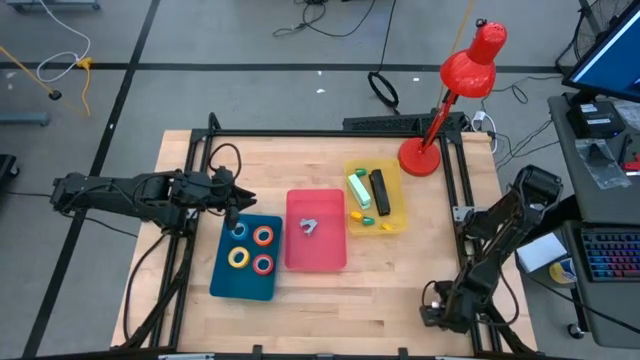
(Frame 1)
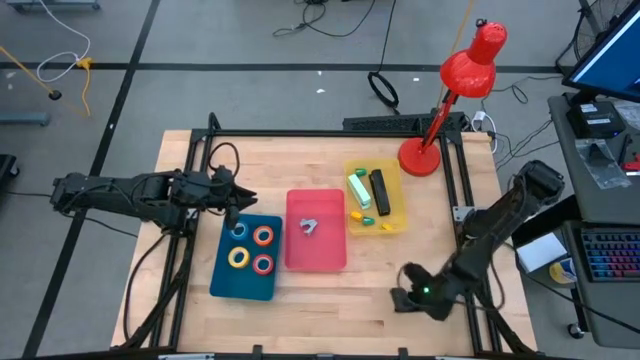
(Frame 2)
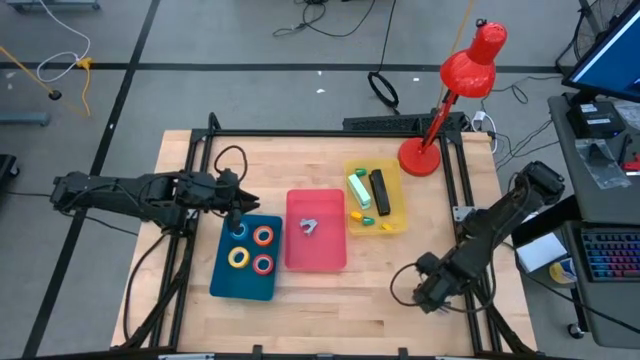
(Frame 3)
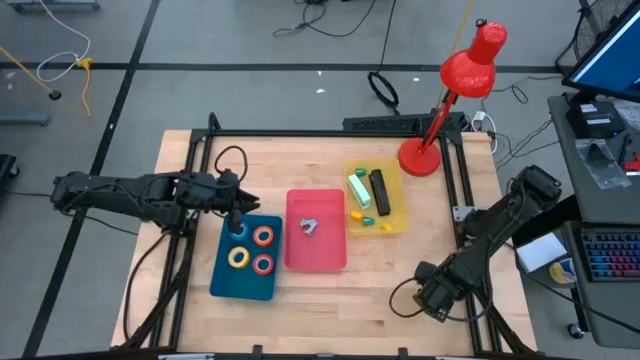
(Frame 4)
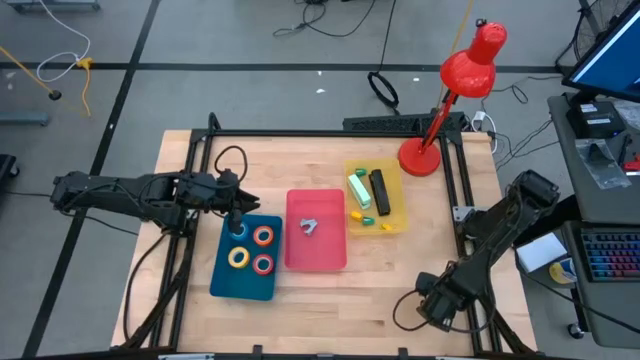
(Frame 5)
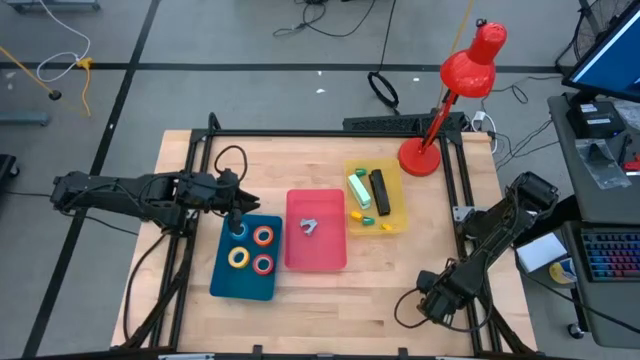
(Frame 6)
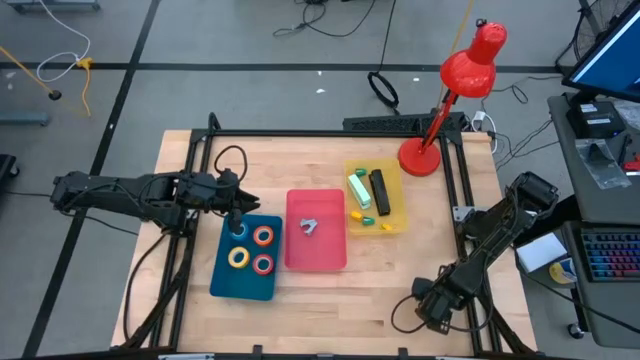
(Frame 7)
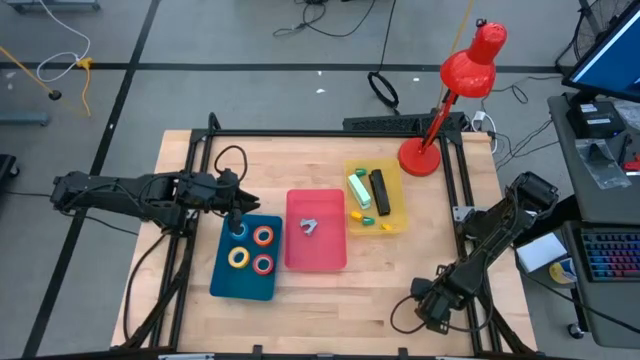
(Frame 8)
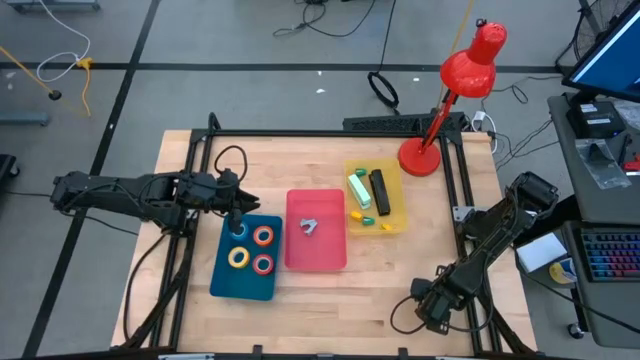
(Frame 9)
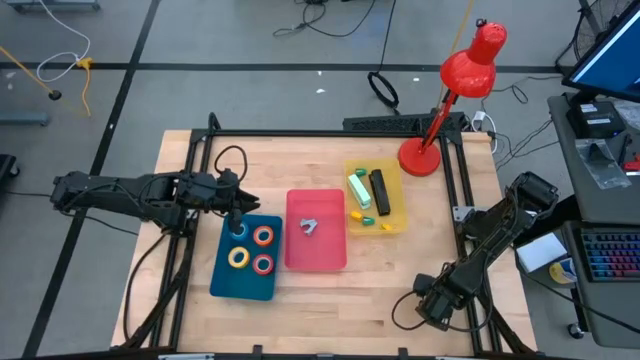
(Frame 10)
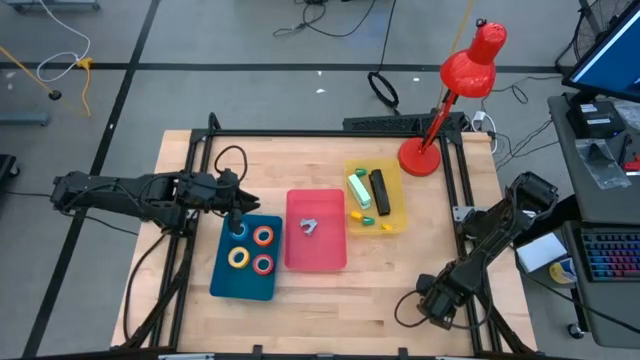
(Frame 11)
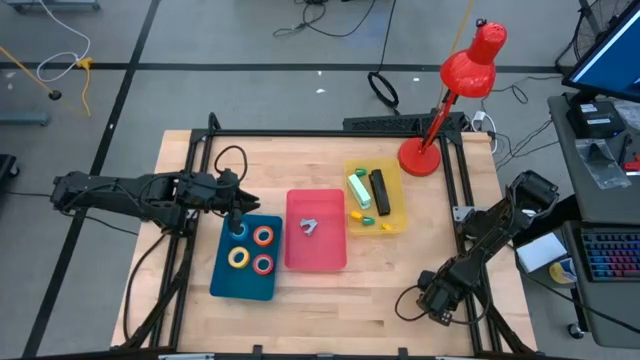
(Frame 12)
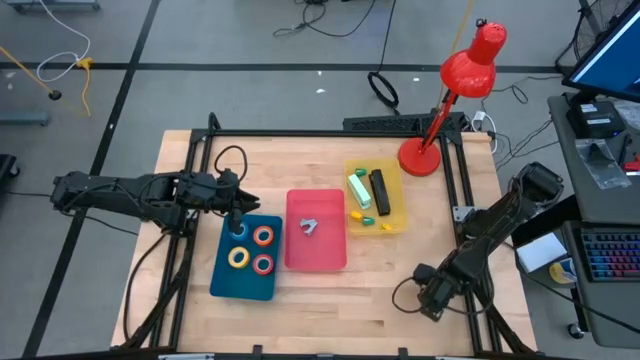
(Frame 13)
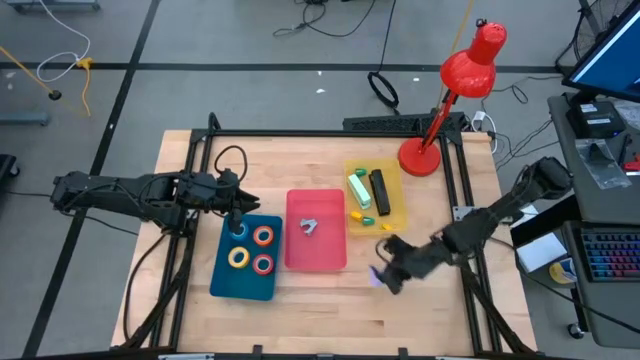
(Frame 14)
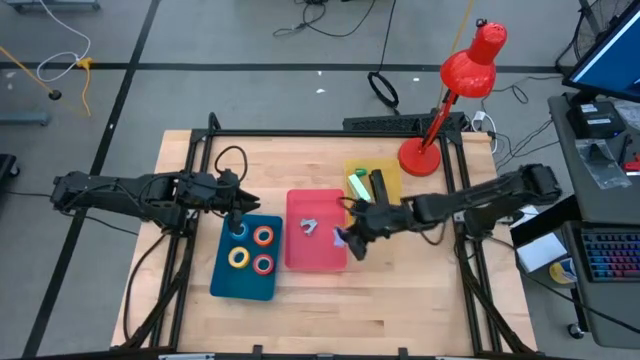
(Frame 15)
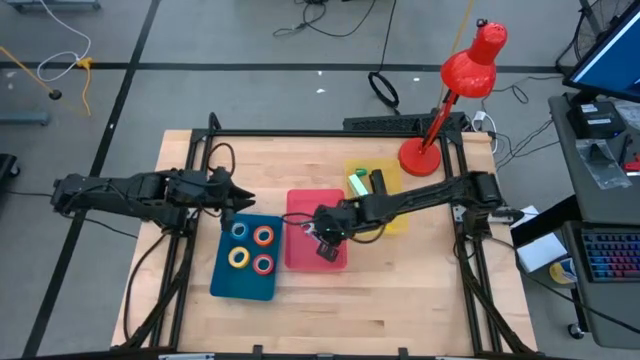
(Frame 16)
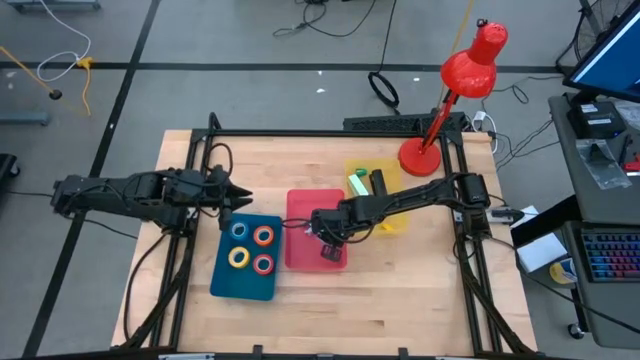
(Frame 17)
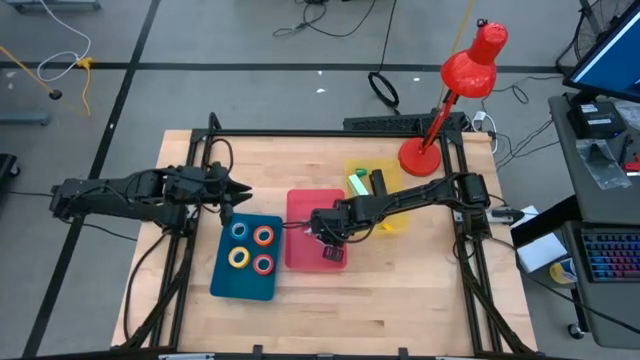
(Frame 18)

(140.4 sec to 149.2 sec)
Task: Pick and place Stapler, Stapler remover, tape
Put the purple staple remover into the yellow bin

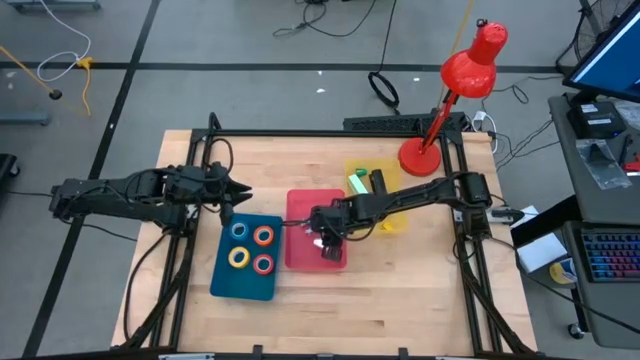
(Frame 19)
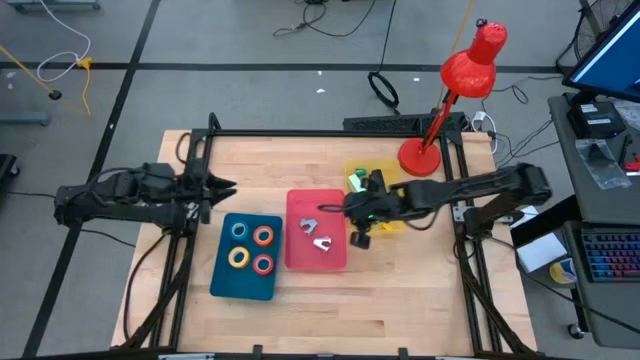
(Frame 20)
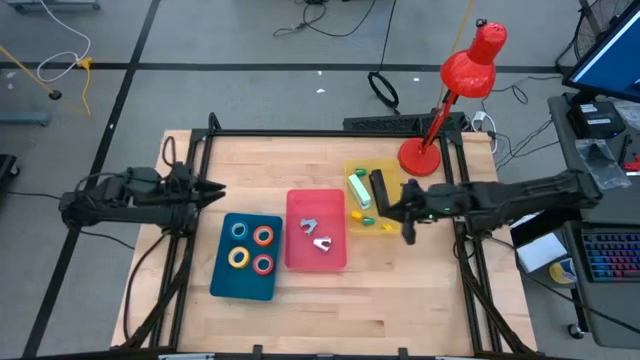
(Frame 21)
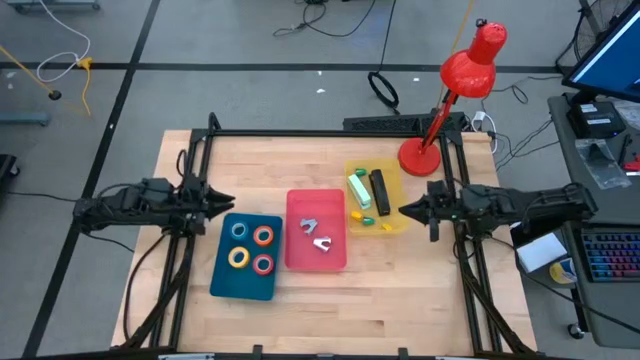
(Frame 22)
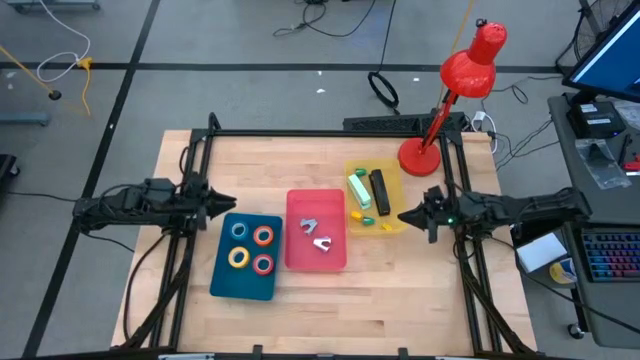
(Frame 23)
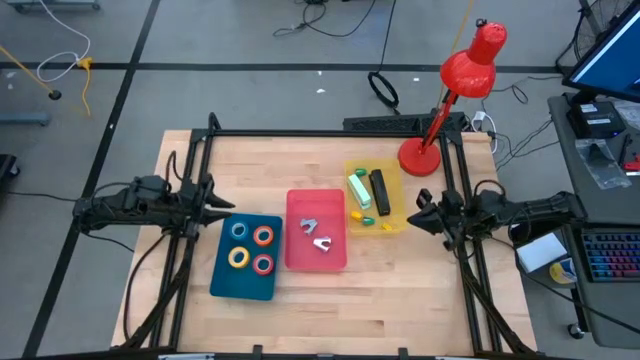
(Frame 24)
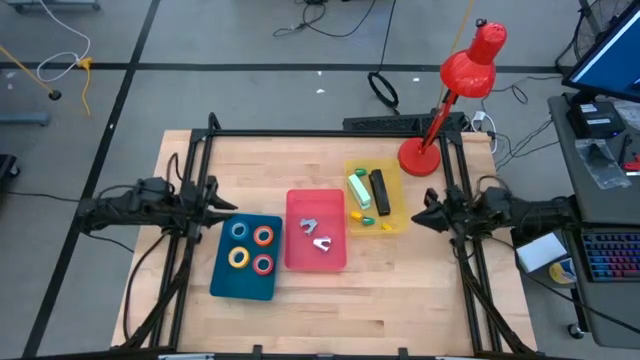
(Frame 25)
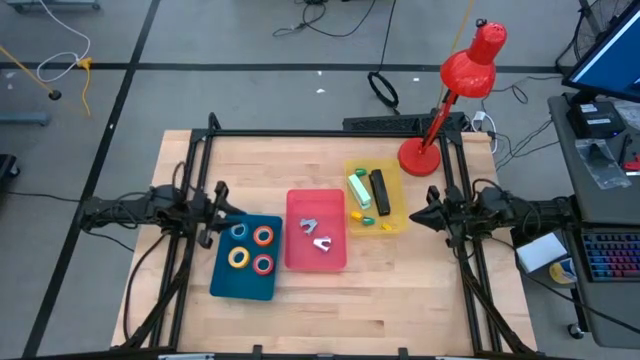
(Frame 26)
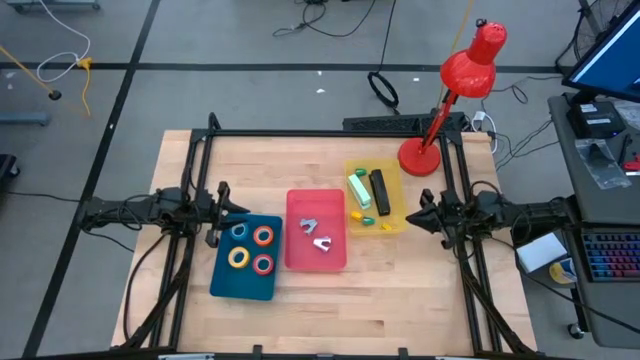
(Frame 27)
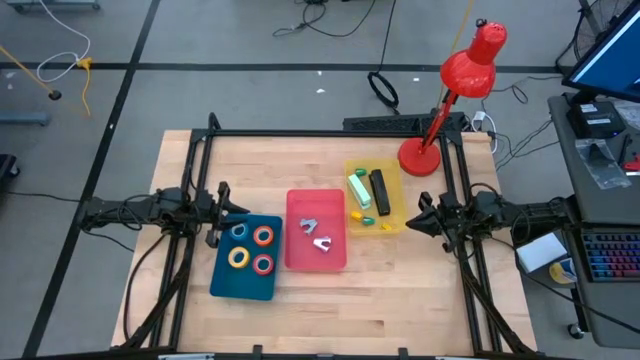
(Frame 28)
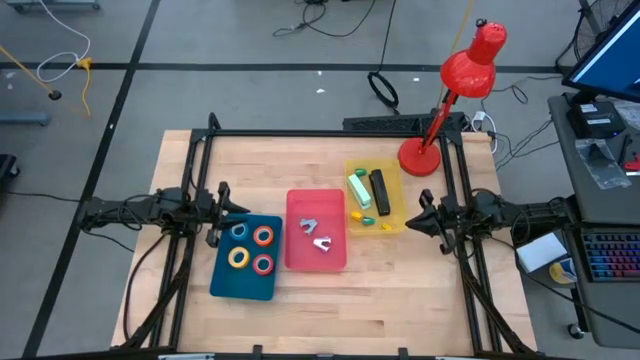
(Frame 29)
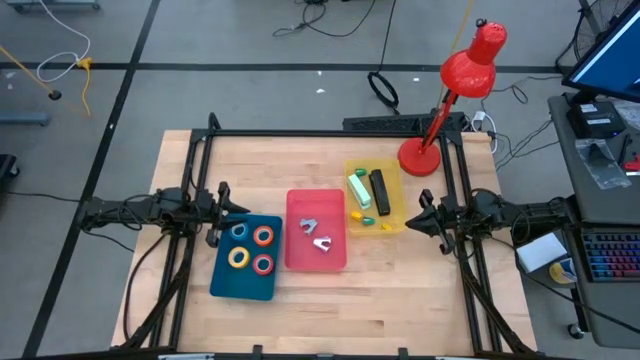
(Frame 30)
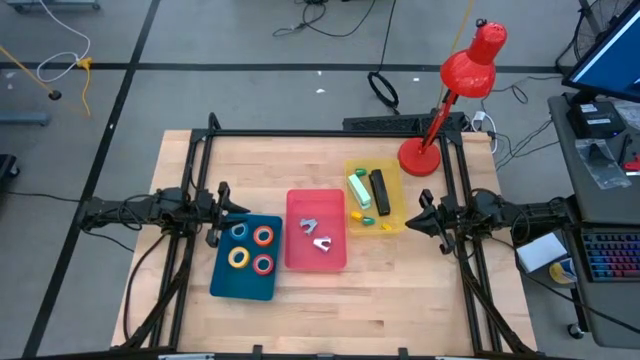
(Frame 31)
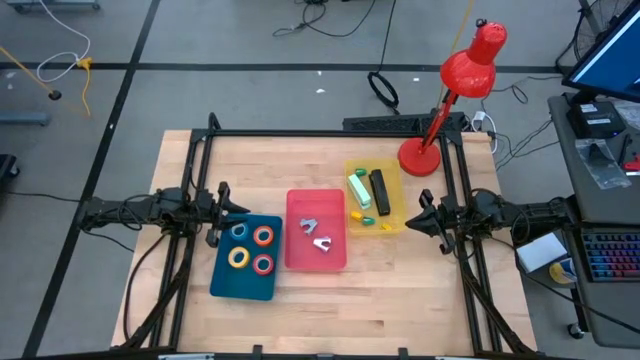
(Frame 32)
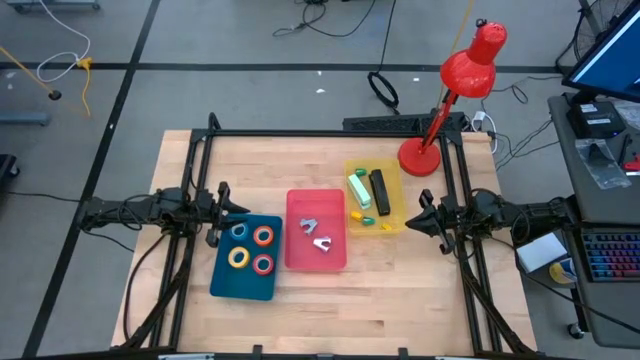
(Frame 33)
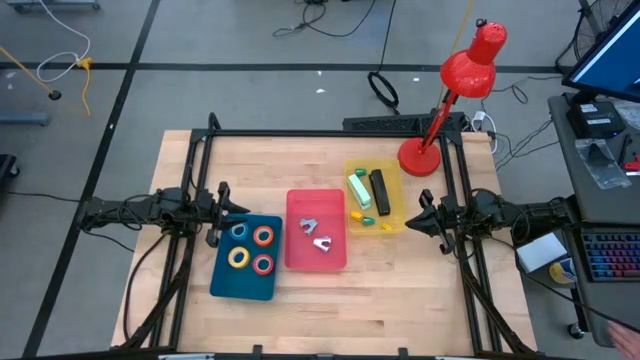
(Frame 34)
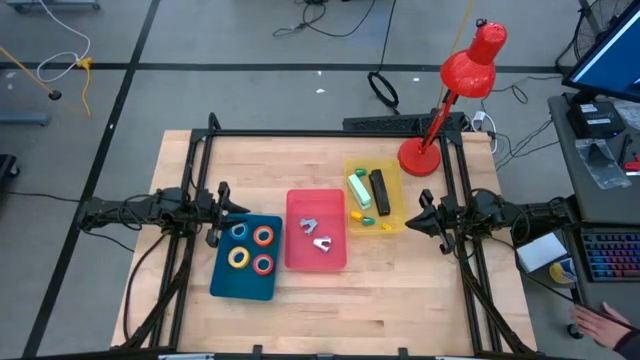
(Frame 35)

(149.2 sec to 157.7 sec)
Return to Home Position

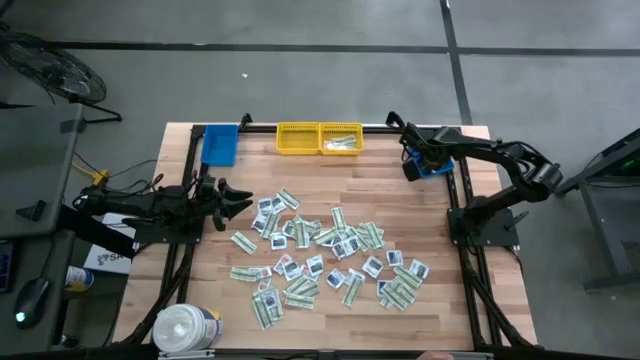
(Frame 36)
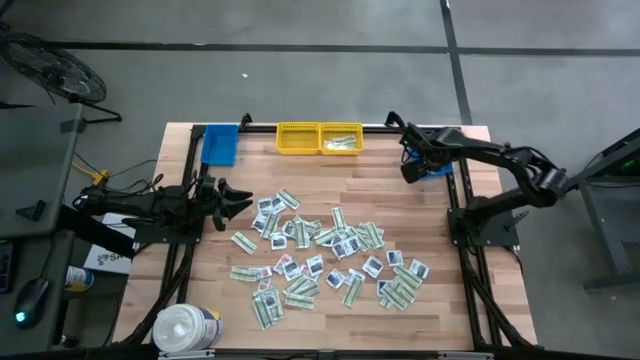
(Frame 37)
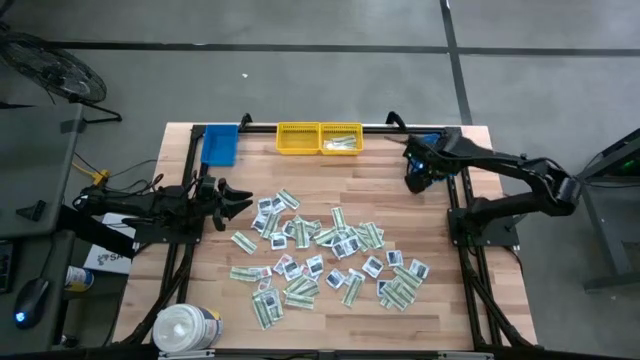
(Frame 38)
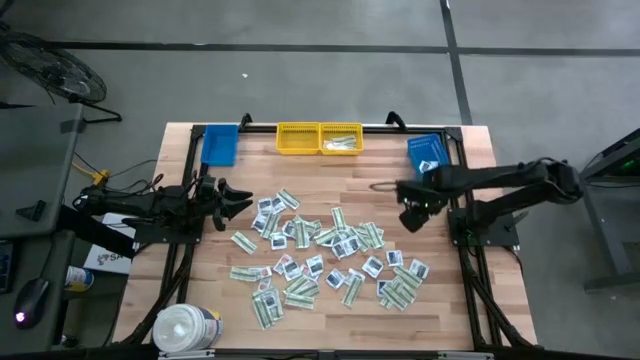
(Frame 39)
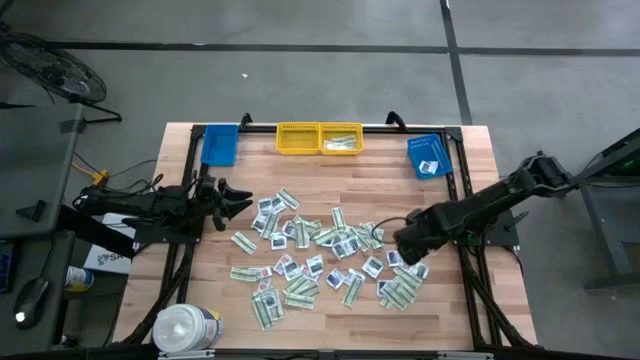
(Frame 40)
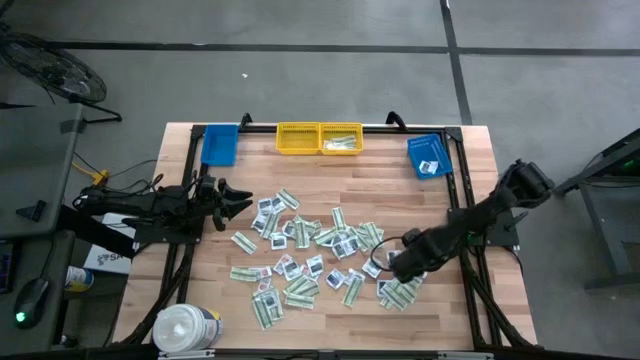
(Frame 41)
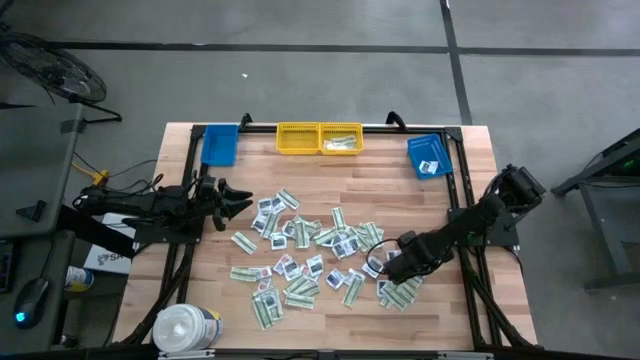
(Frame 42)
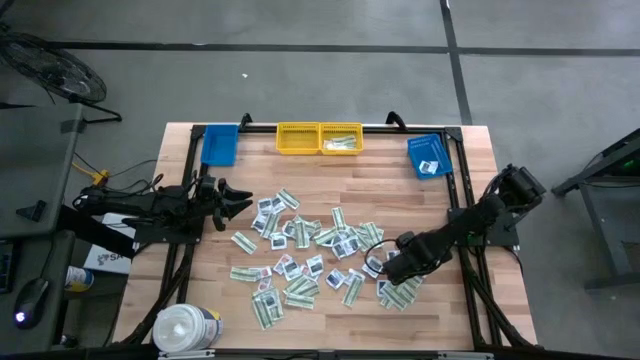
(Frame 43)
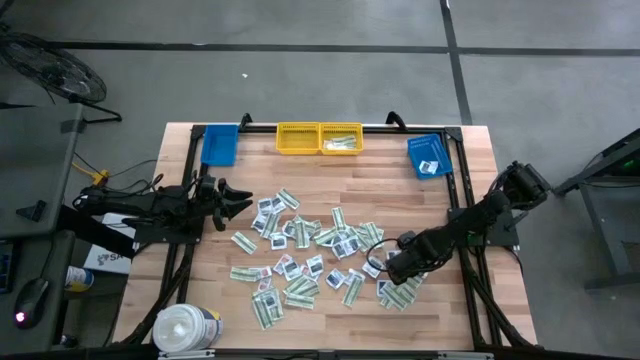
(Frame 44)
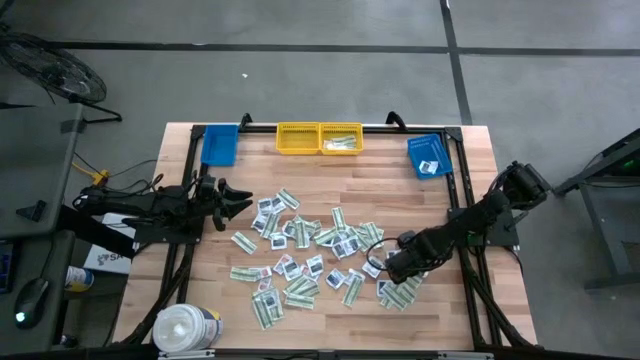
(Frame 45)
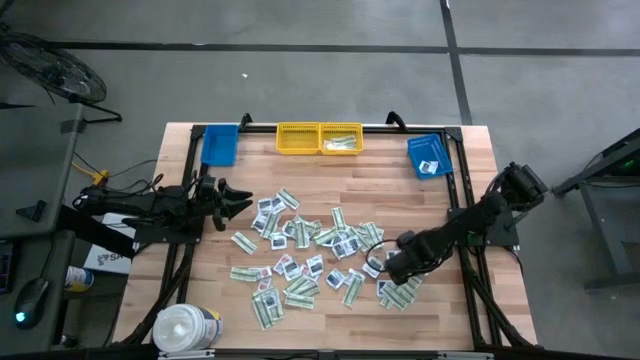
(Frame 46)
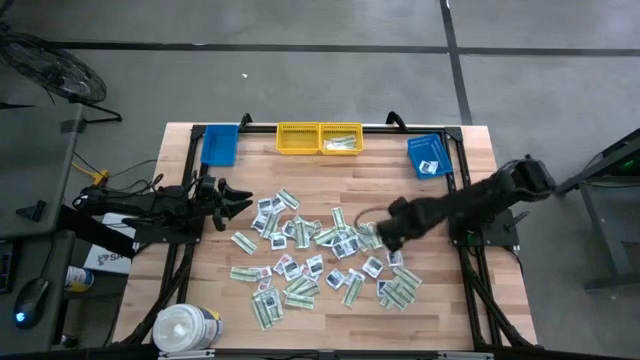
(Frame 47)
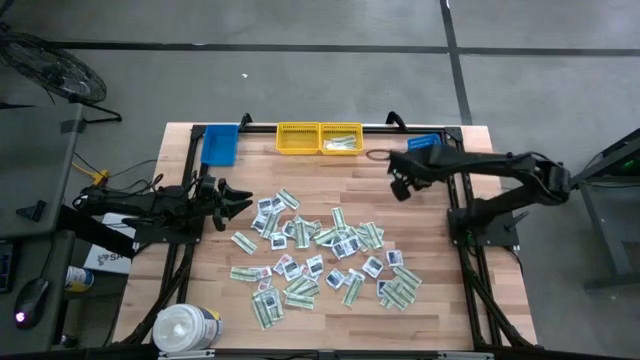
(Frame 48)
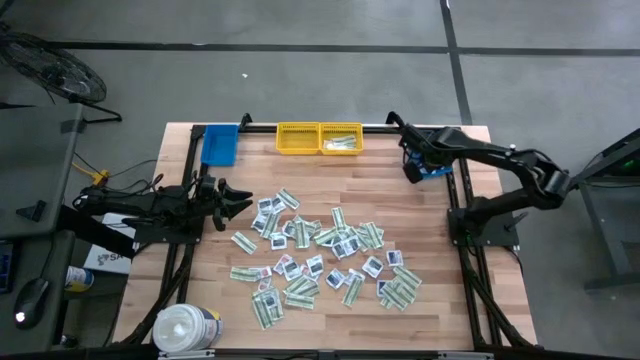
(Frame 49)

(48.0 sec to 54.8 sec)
Task: Pick & Place First Aid Supplies
Put the black towelette pack into the right blue bin
